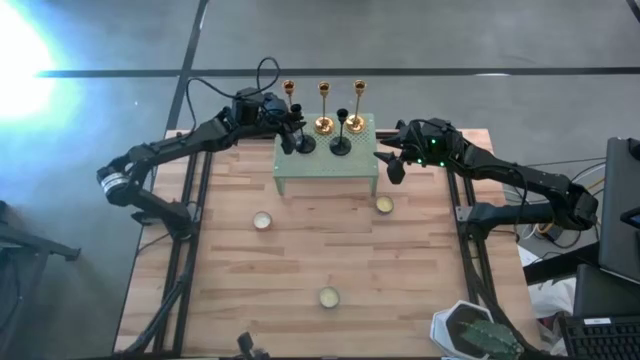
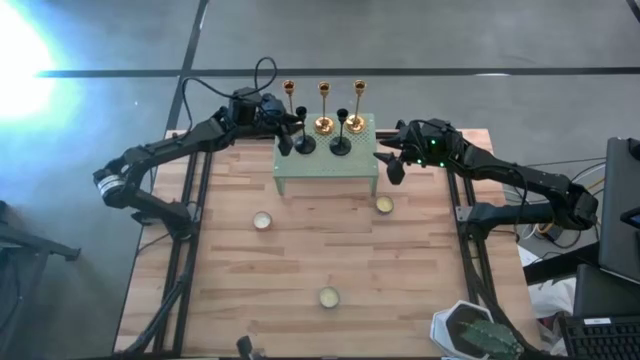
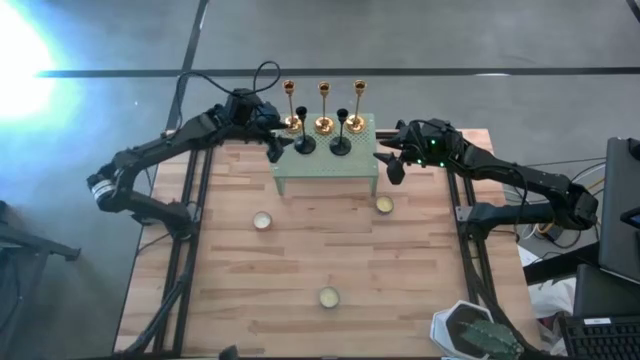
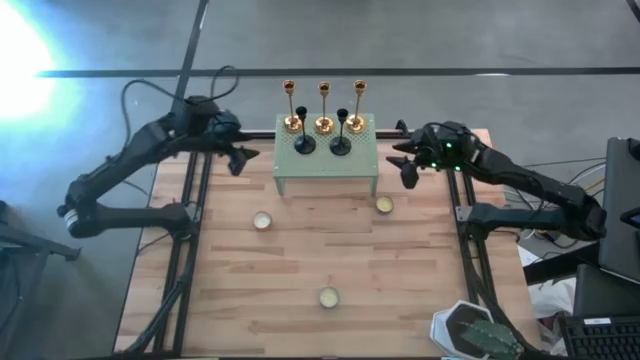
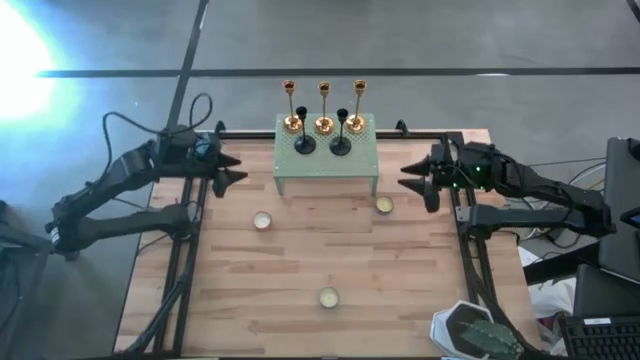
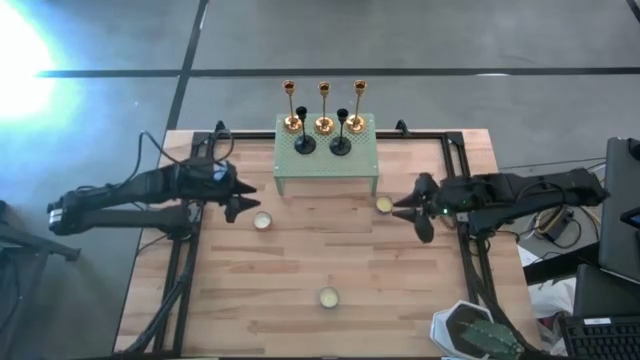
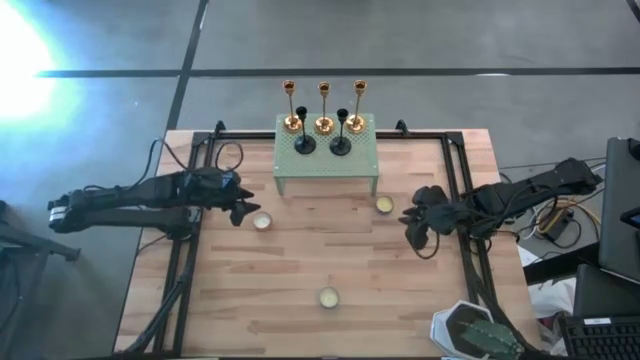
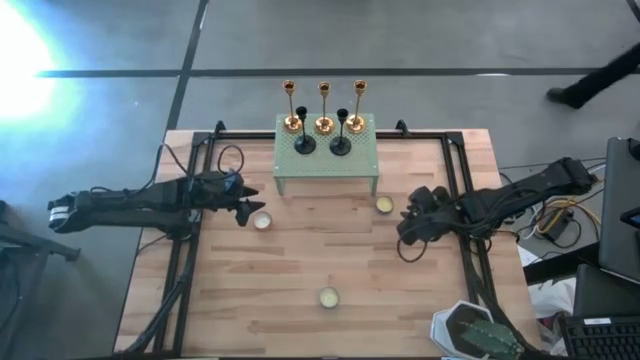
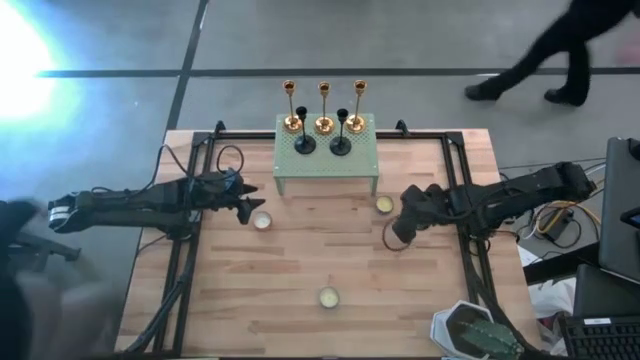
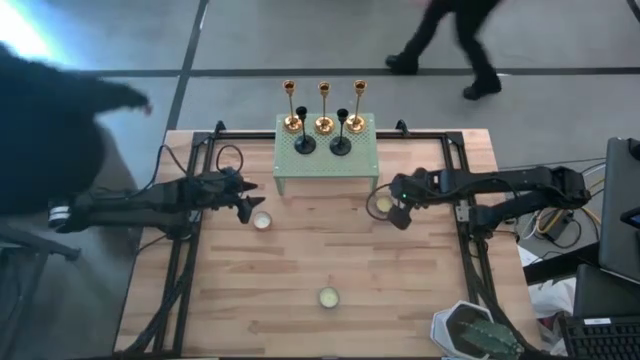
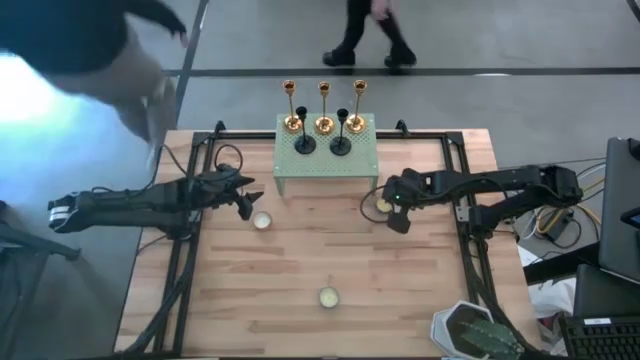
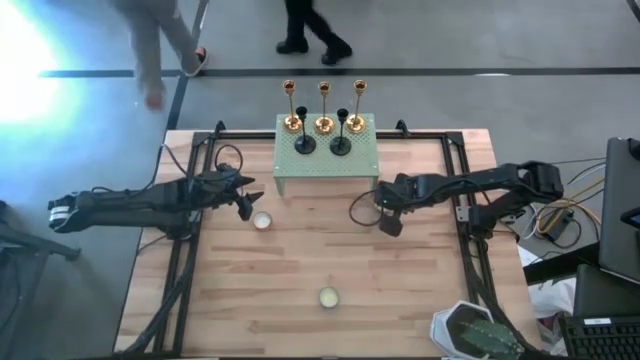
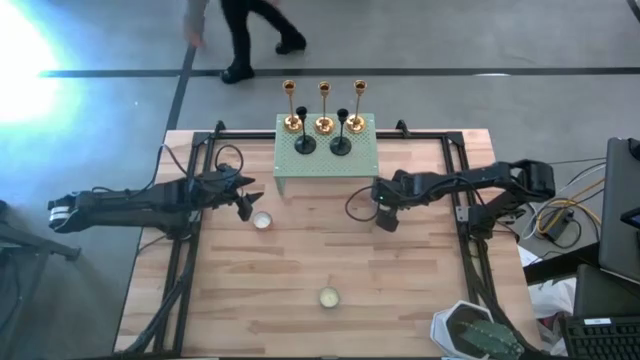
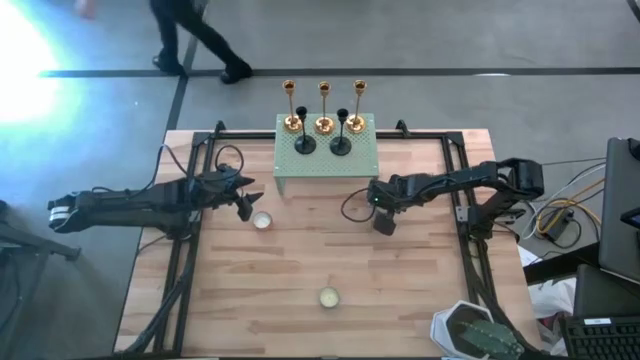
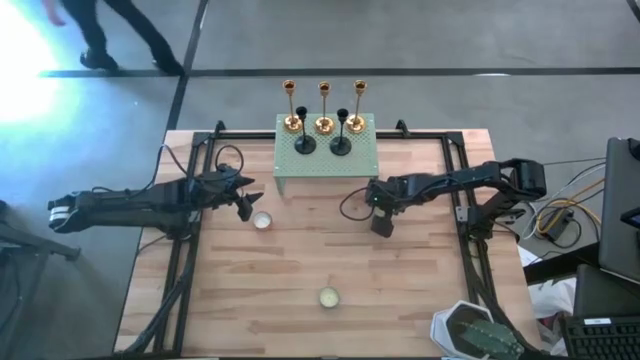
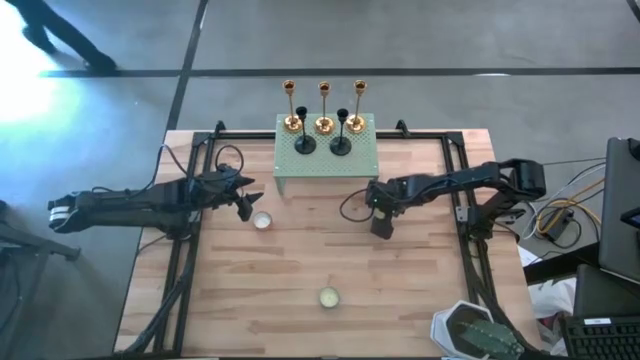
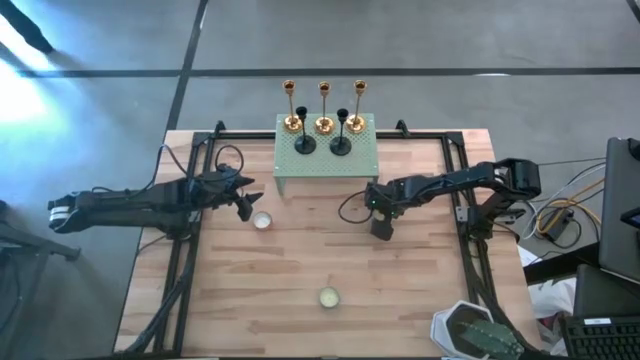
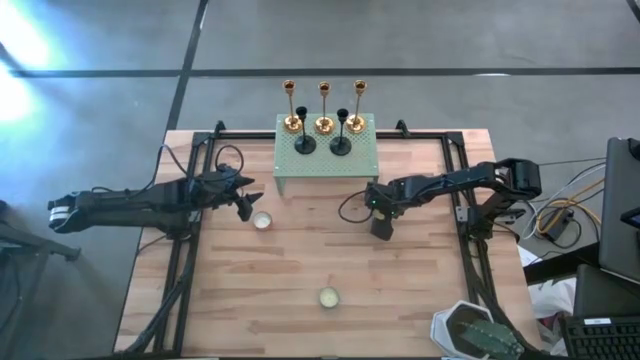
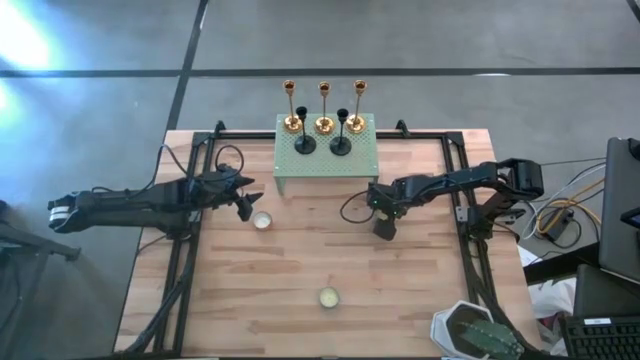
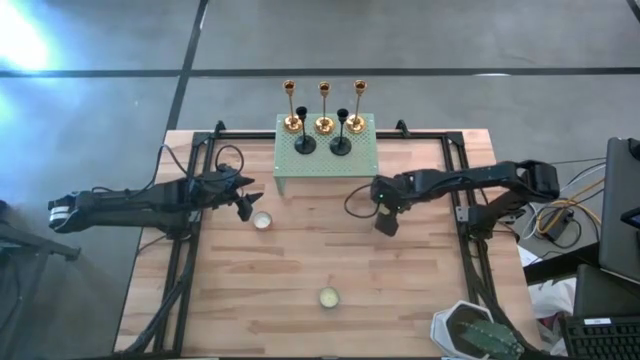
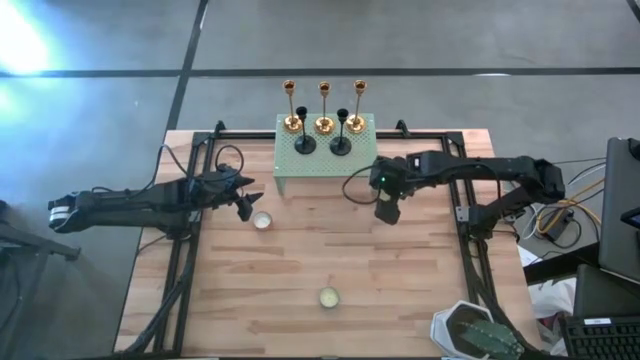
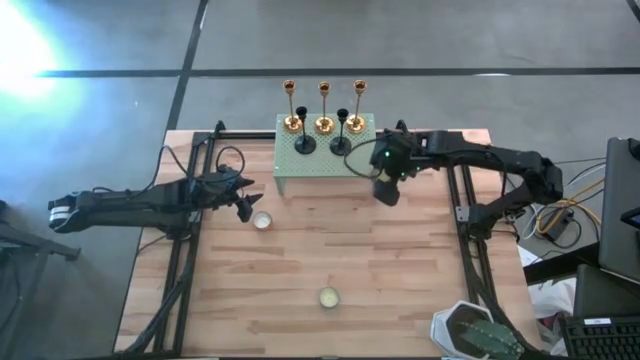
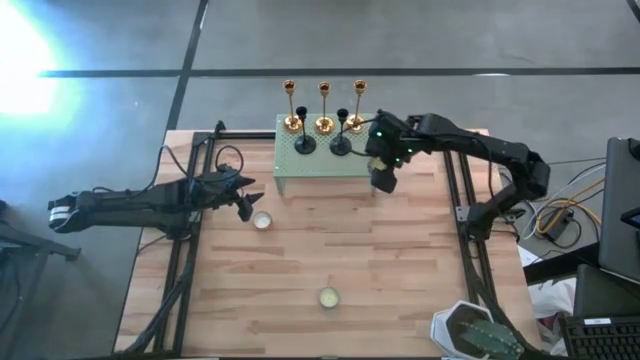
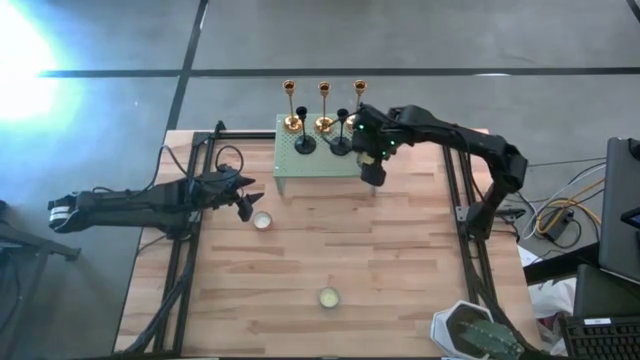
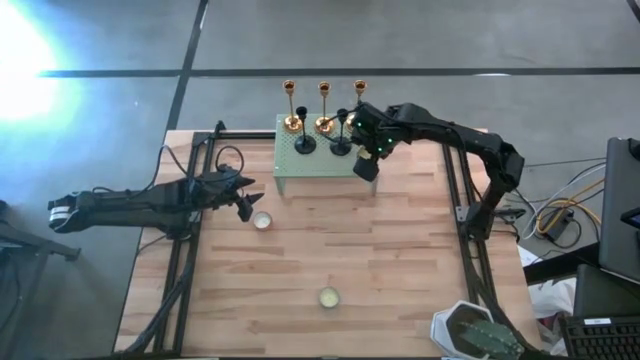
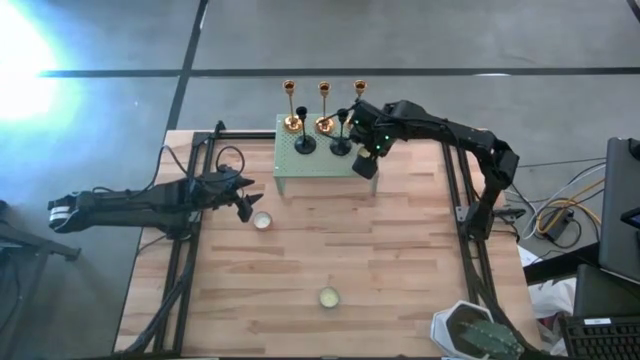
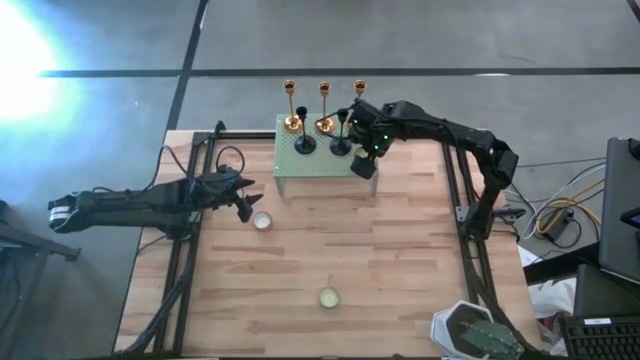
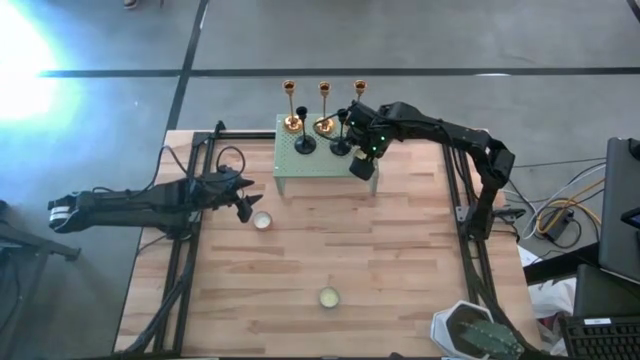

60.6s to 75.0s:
Task: Pick & Place candle stick holders
Put the red patterned scented candle on the shelf

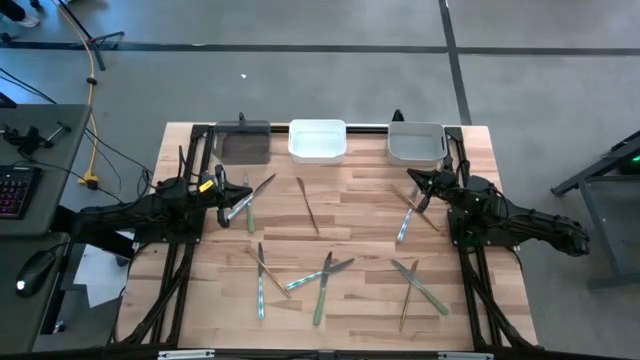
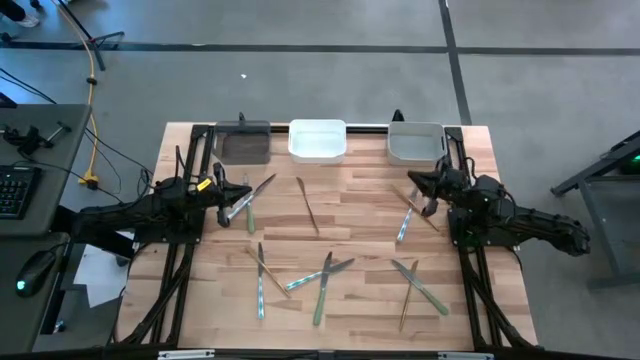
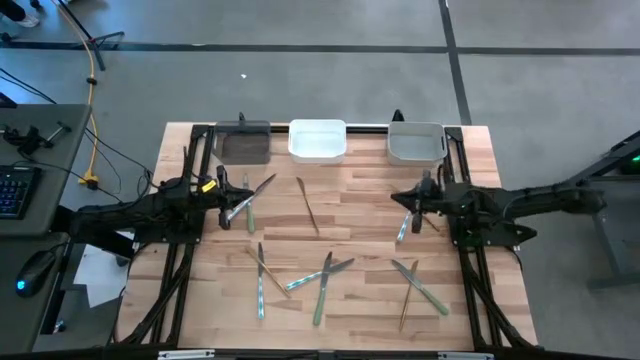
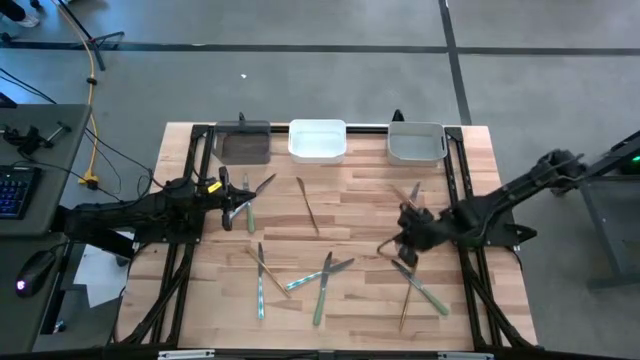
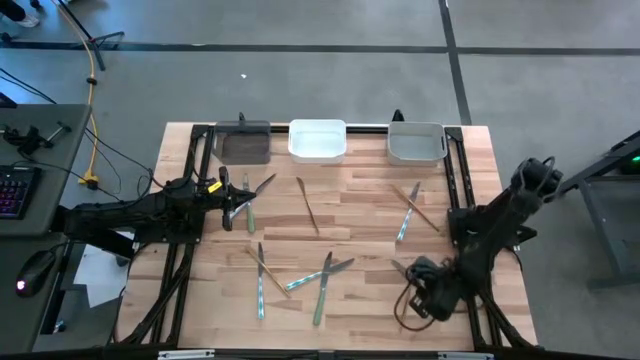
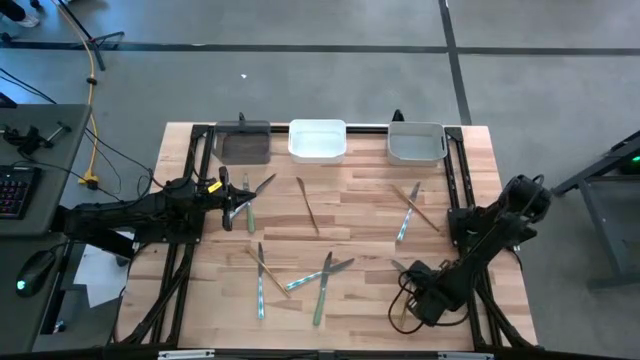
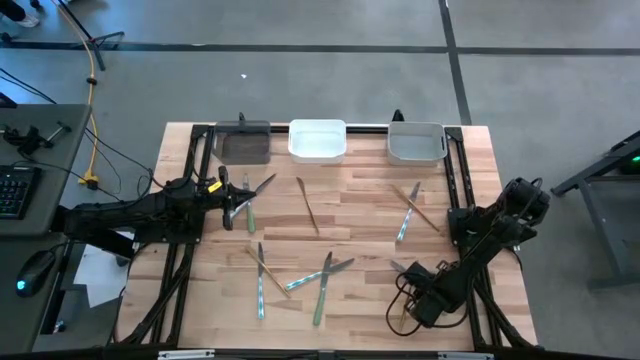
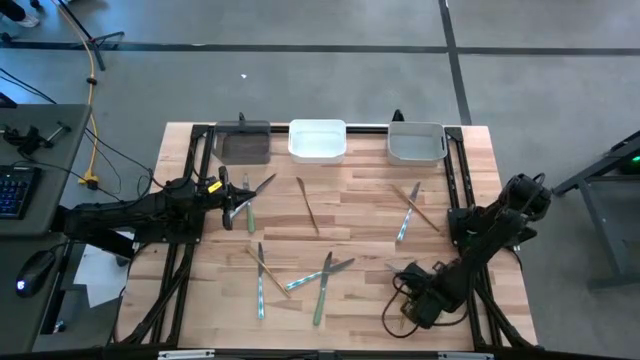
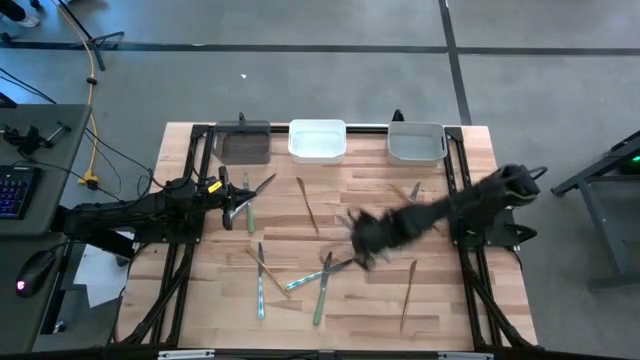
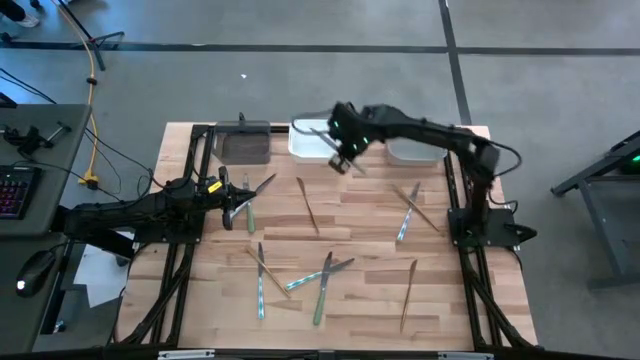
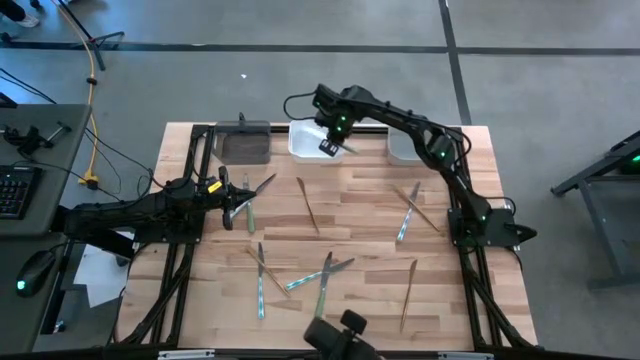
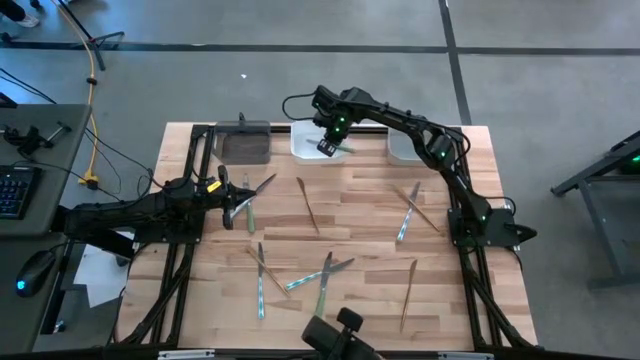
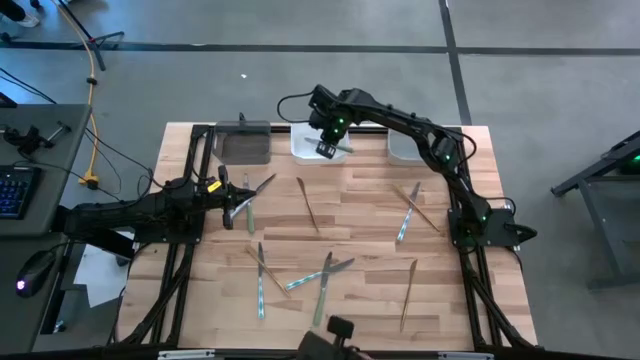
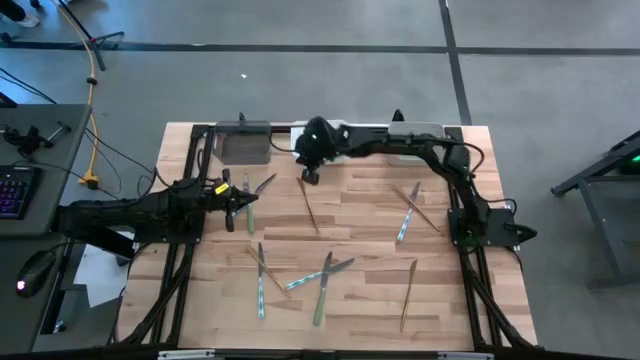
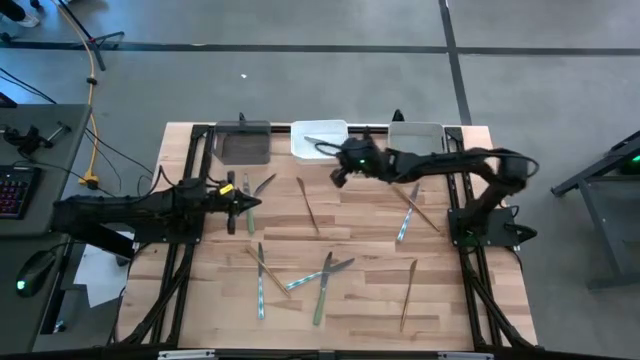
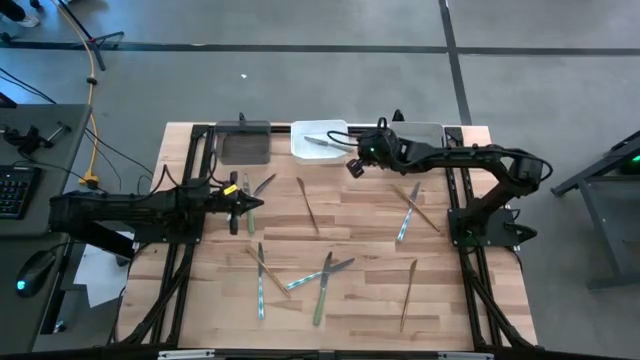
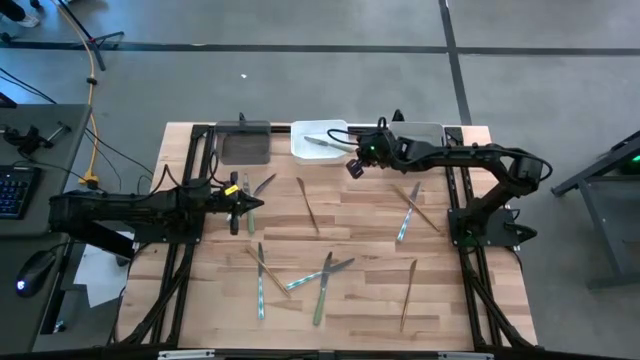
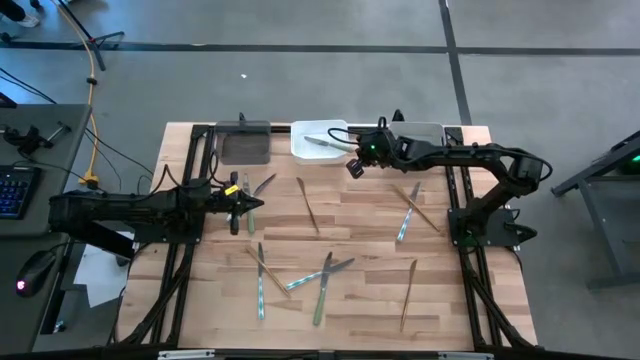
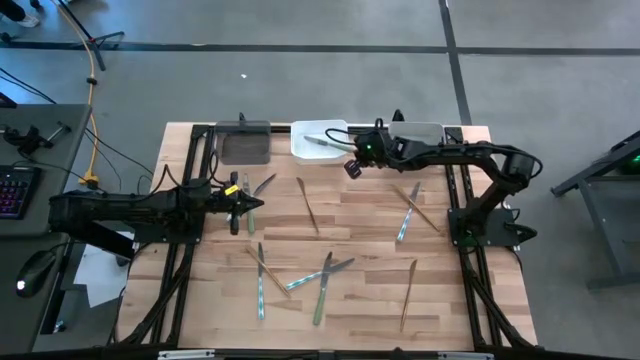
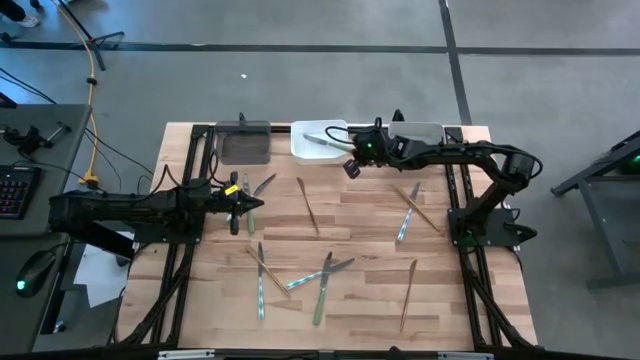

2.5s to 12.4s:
Task: Sort silverware by color (type)
Put the green knife into white bin
